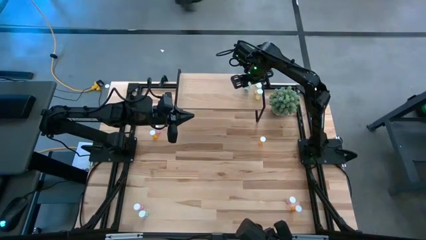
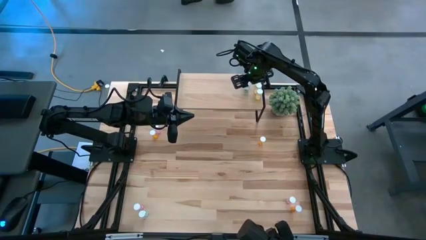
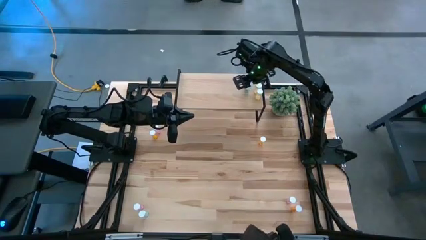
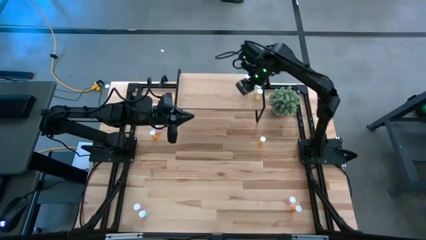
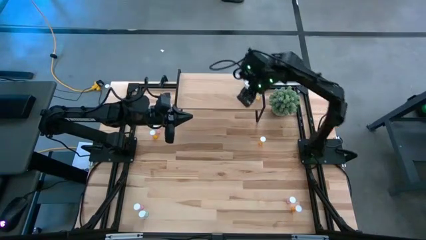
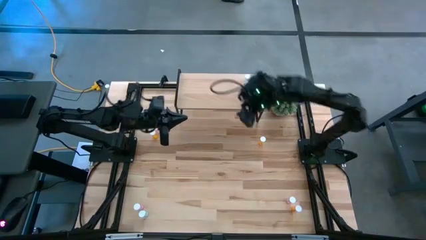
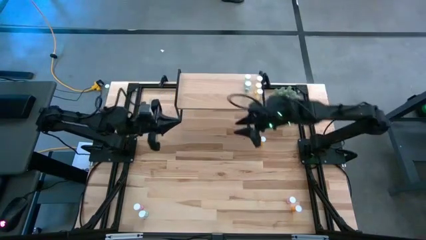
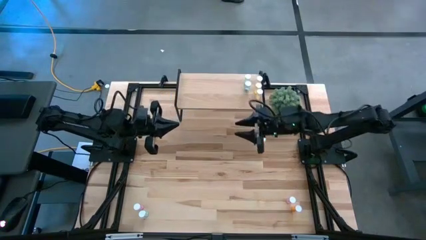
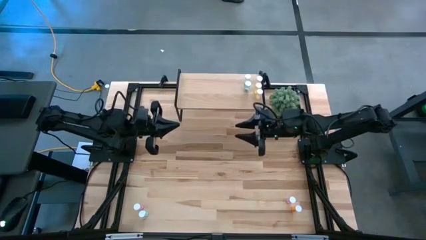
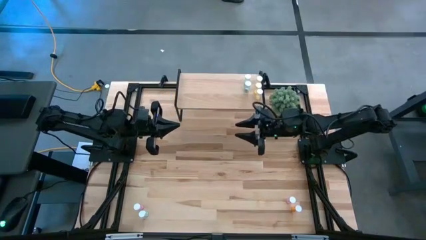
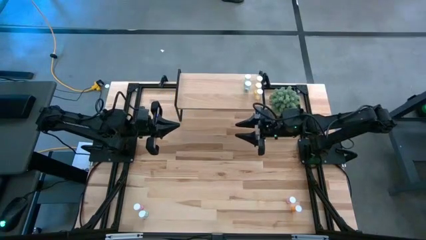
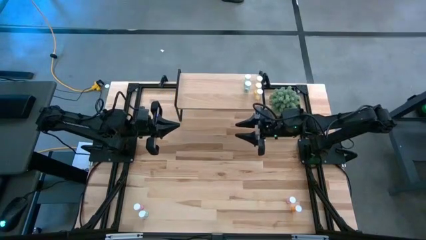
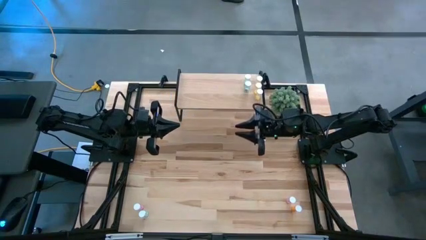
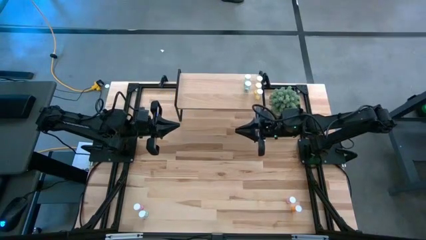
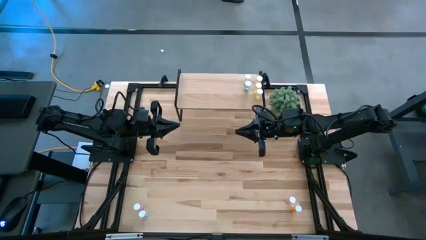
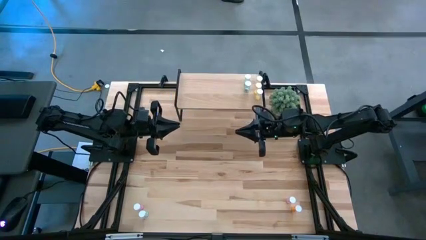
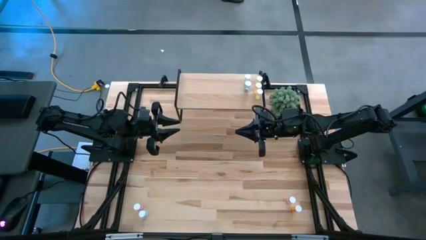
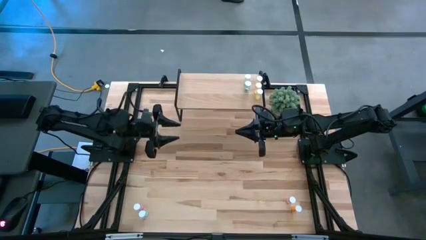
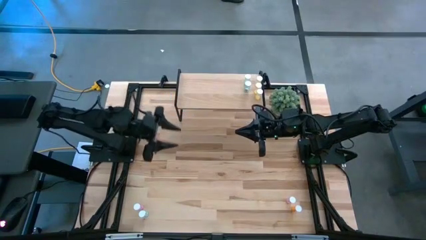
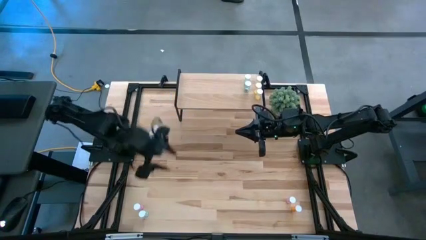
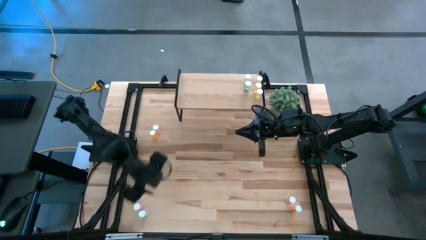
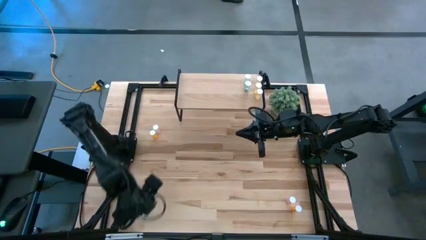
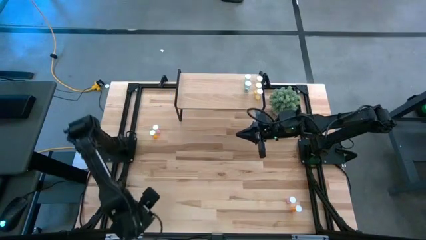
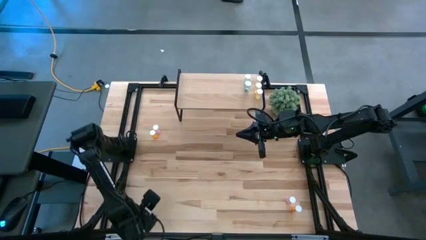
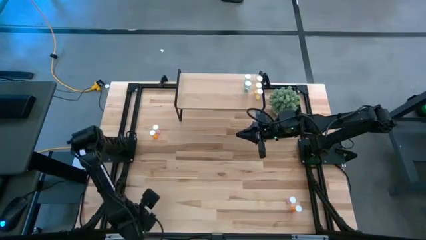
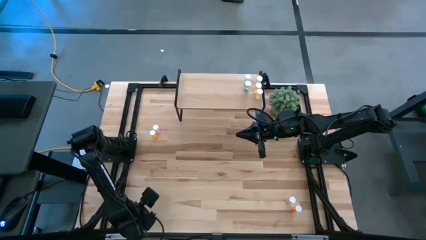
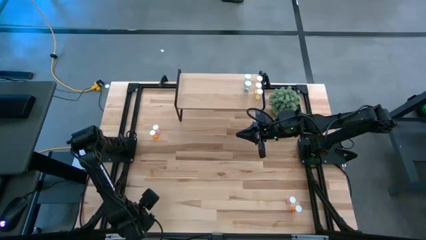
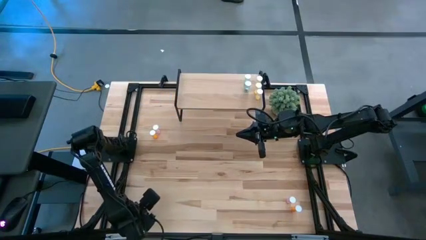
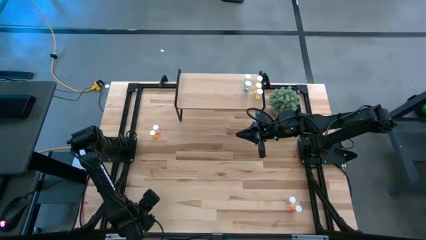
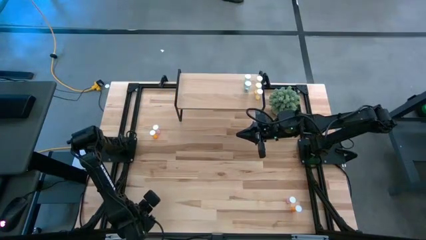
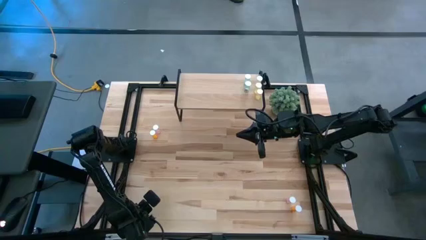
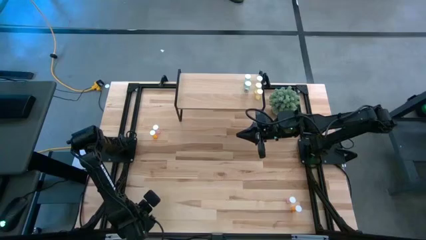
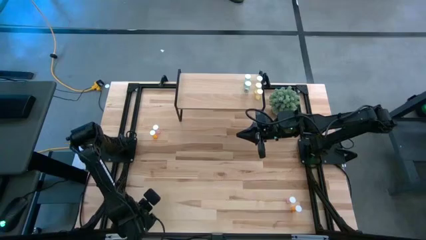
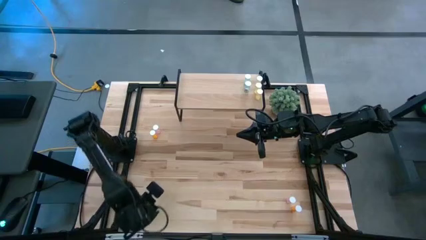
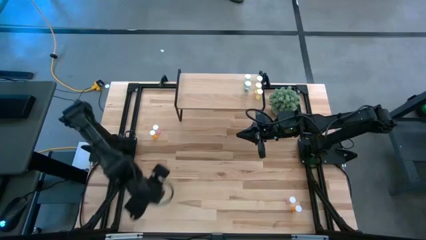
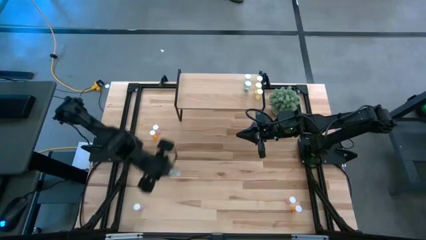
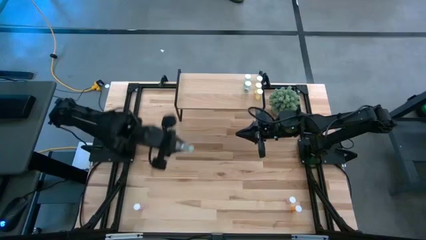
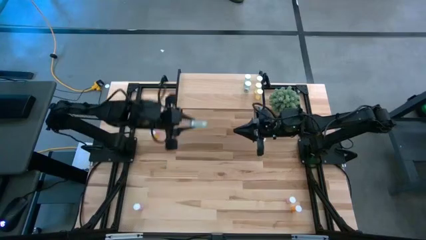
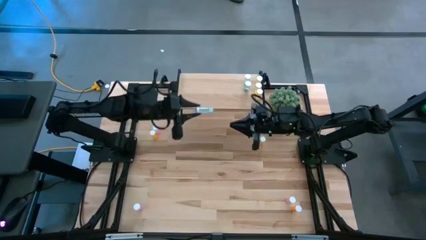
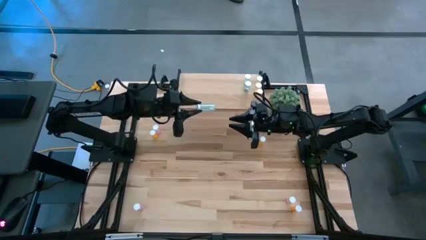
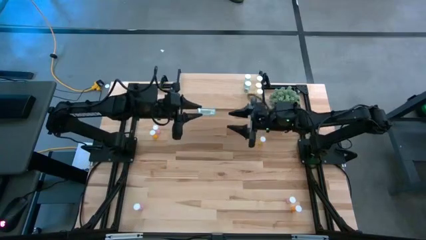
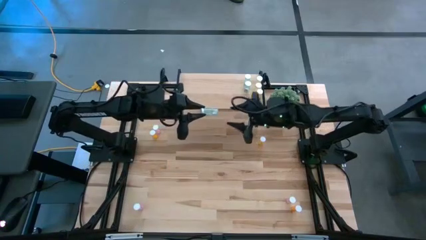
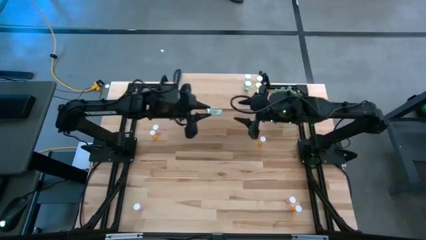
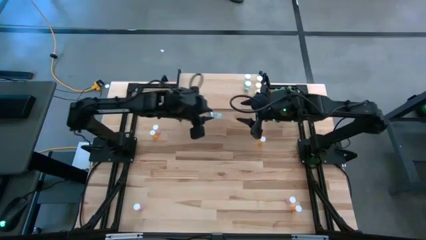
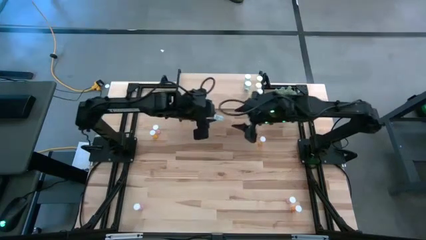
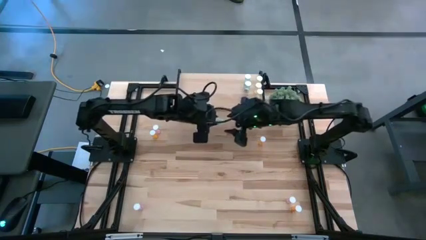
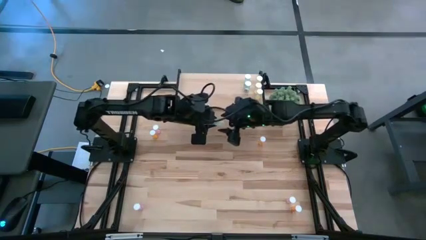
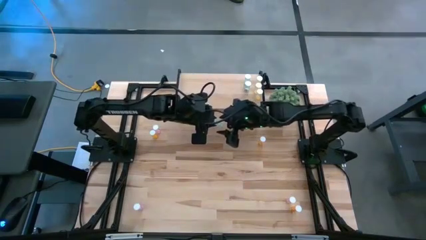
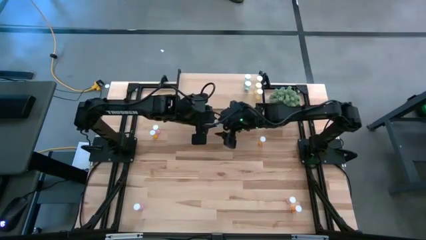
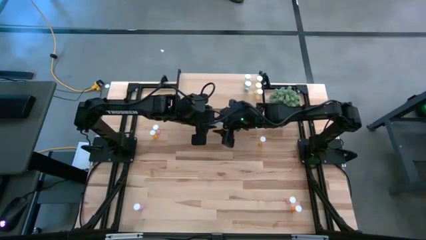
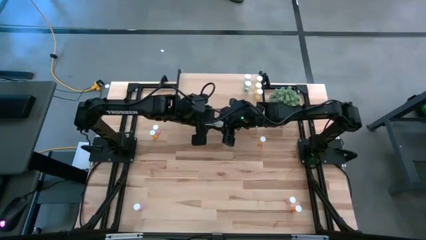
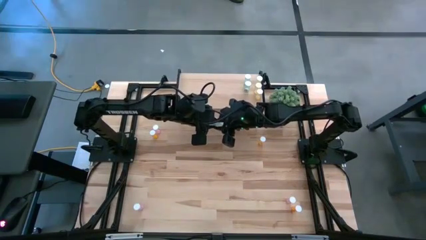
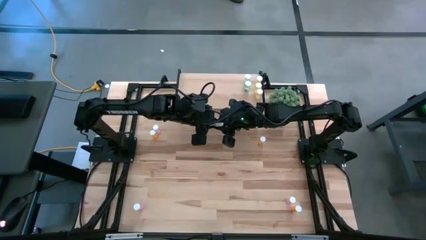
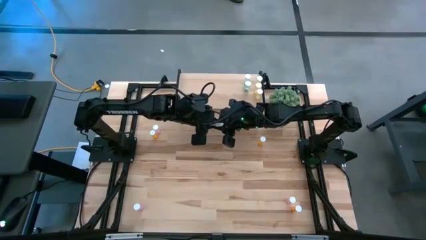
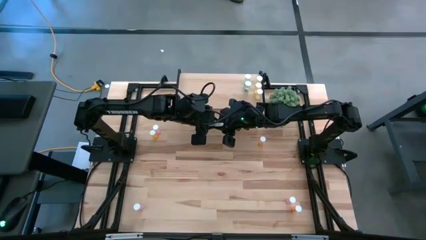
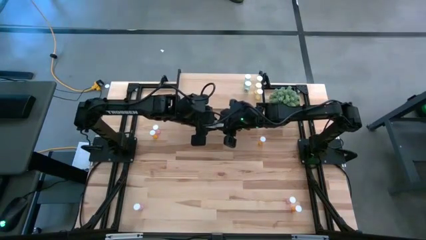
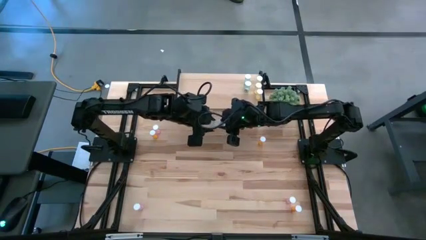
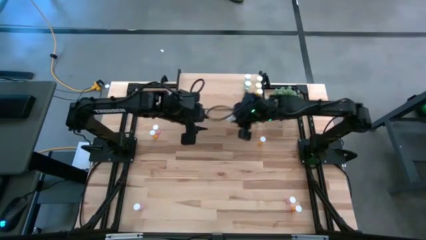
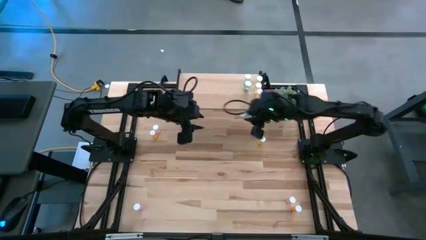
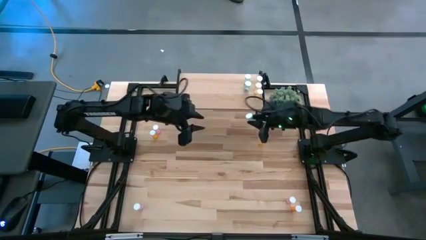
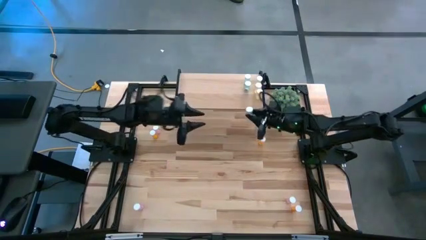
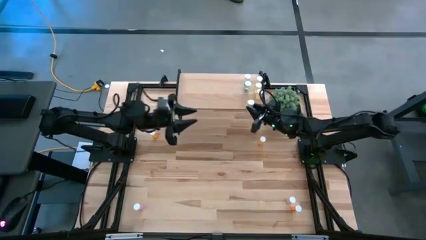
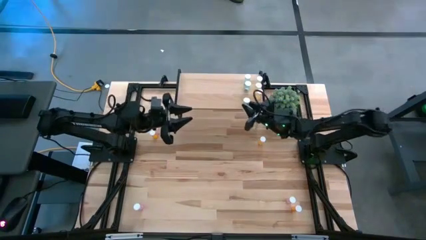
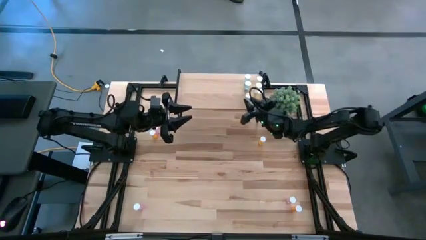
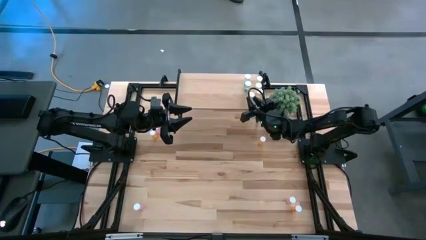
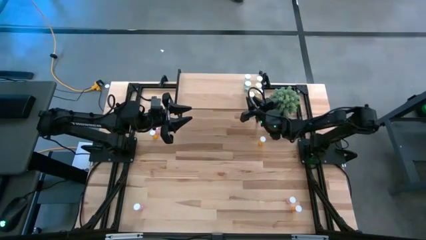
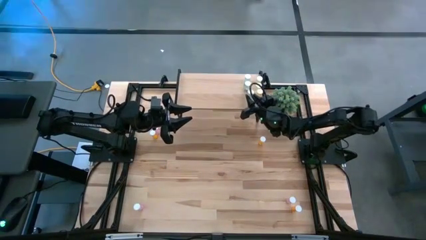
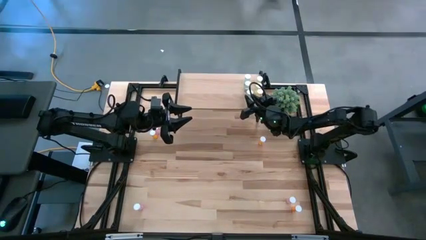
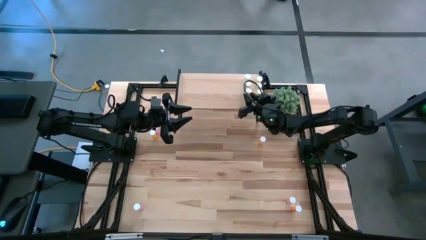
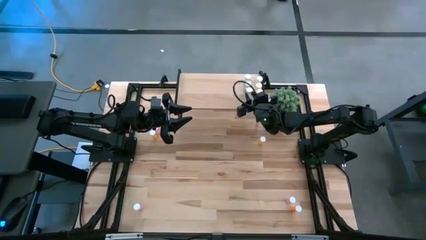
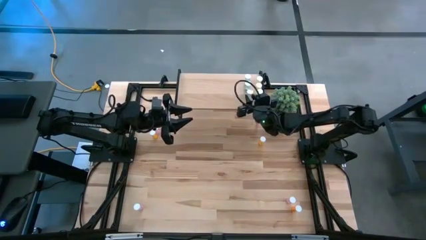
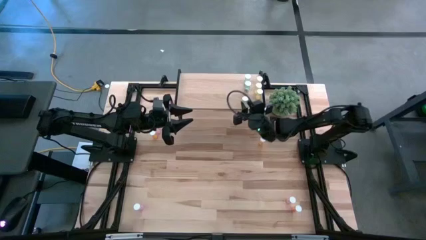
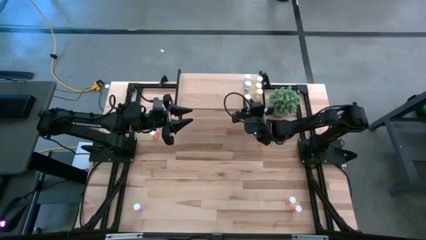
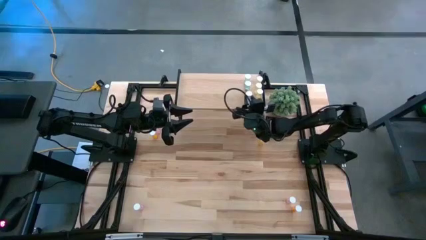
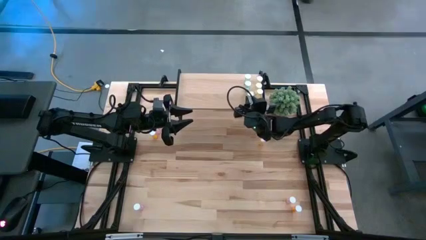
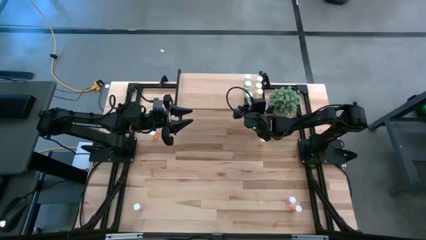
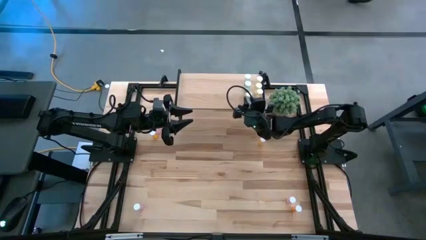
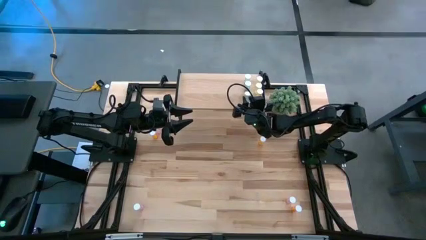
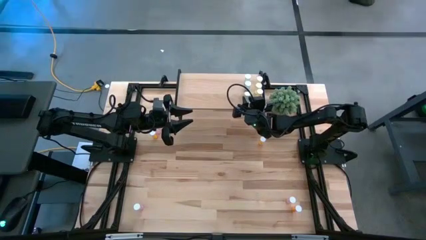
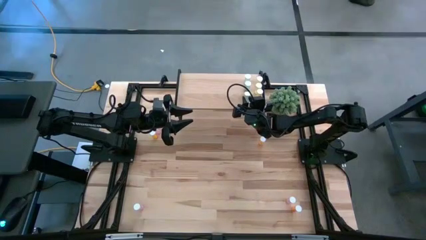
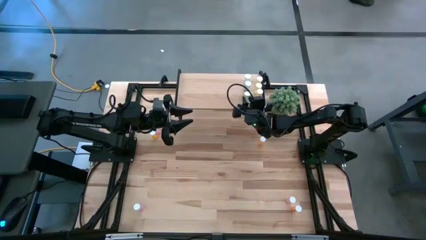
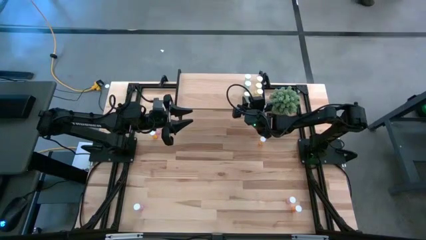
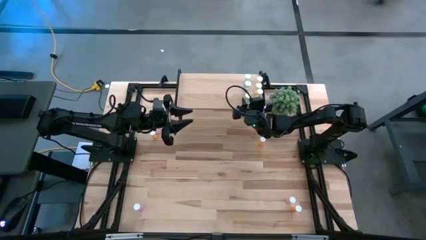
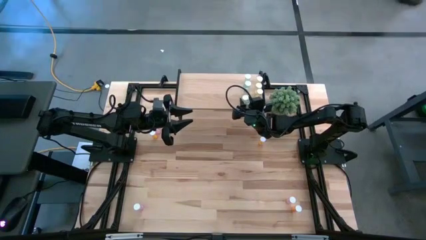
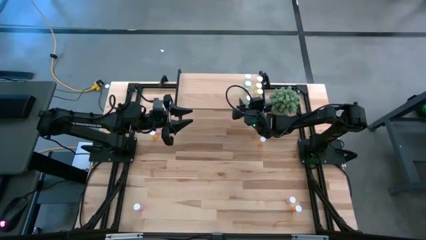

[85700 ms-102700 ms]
Task: Pick and place medicine bottles onto shelf by color
Put the blue pill bottle on the shelf aligned with the other blue pill bottles
